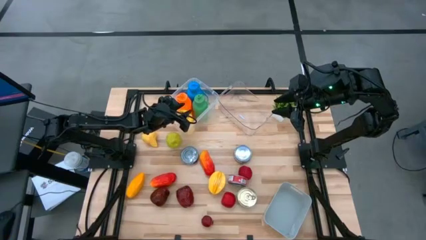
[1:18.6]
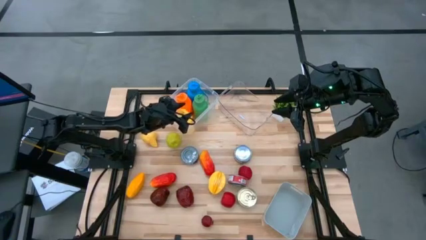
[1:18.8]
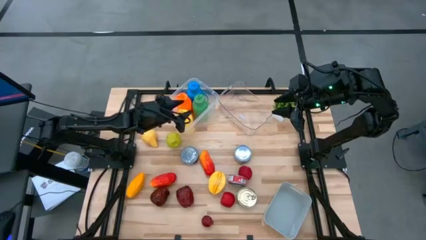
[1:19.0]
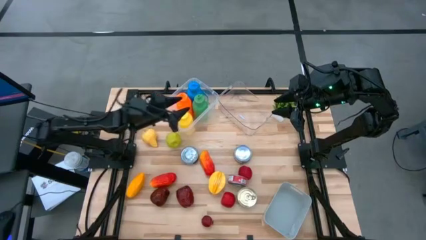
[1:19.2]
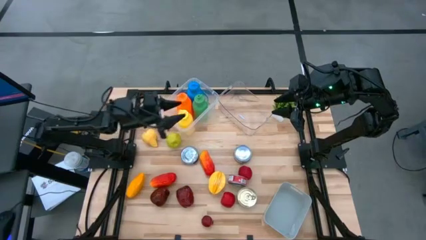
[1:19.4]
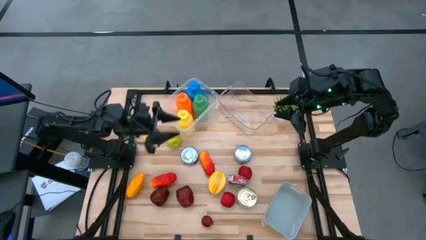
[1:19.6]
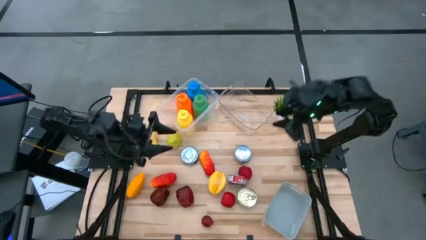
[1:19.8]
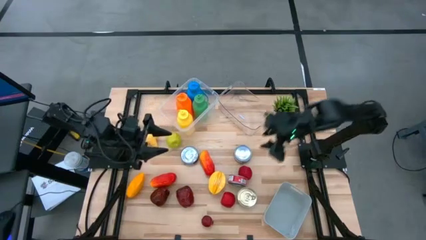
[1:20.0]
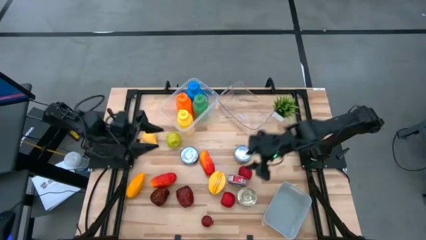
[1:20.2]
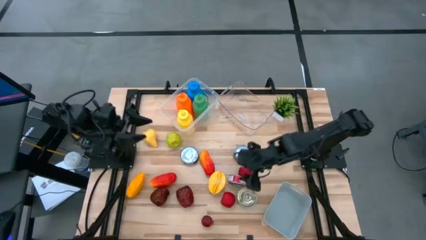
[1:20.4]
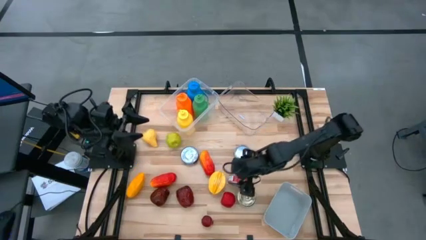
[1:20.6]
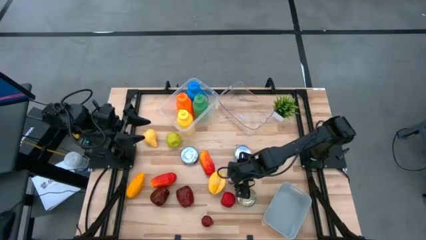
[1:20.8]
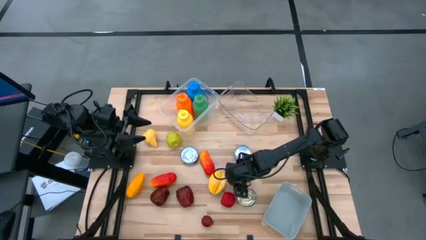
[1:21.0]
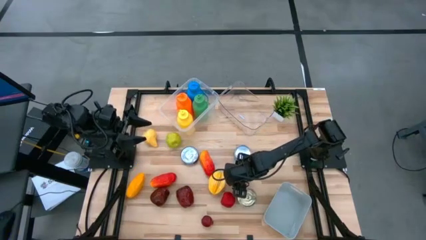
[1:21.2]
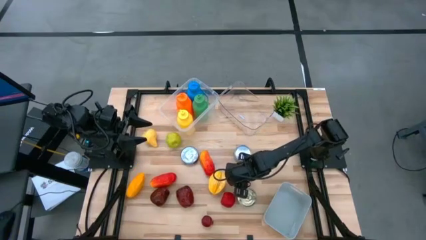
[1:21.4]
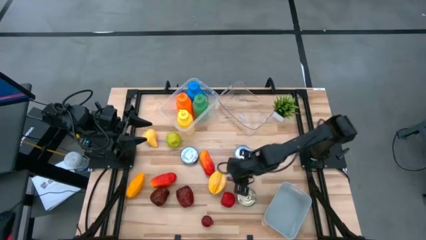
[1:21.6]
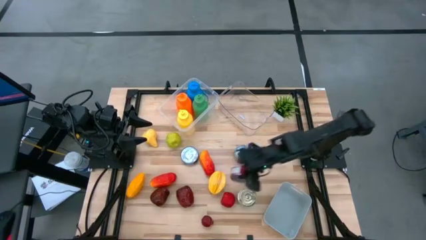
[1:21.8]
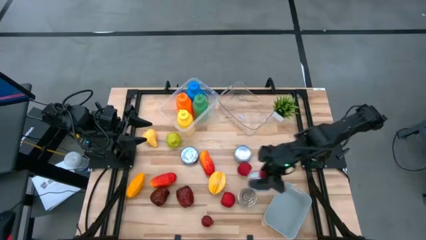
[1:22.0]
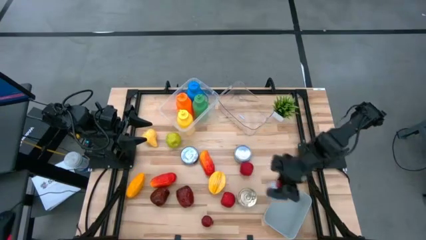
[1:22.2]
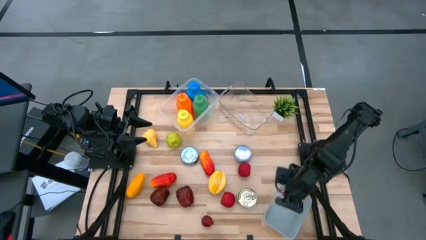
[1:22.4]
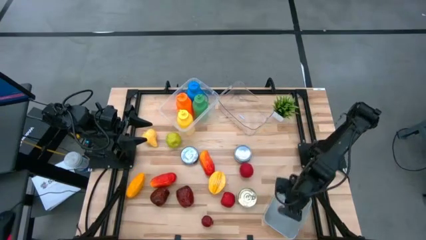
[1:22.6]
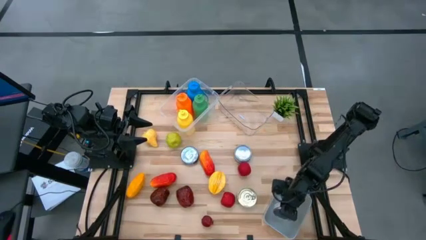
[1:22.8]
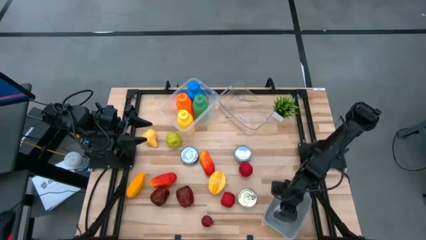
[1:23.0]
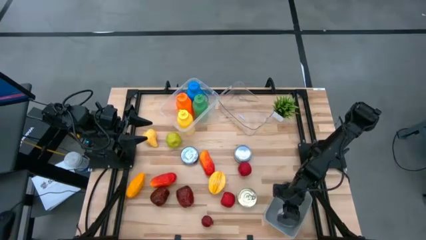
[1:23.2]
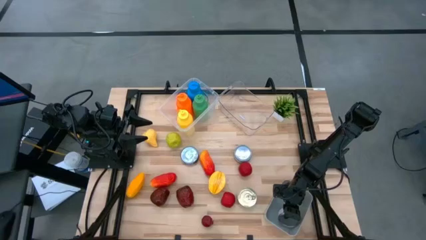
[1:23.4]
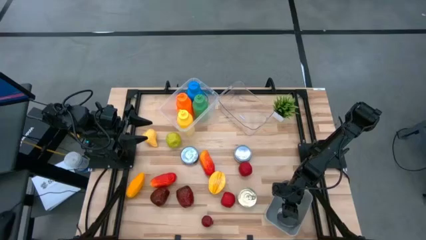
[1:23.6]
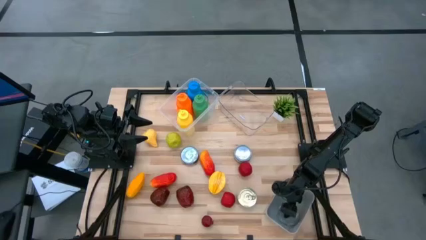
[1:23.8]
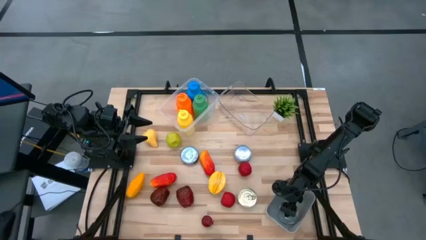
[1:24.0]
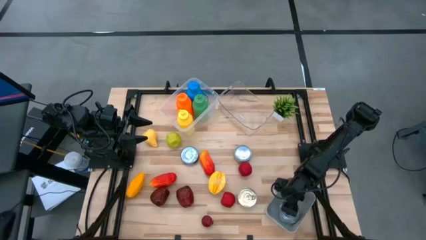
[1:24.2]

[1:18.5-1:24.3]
Task: Pick & Place Food Item
Put the red tuna can into the gray bin

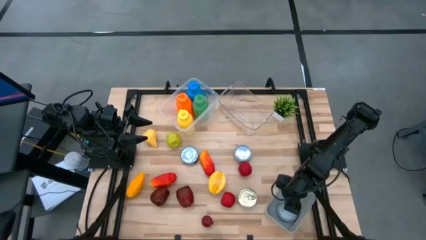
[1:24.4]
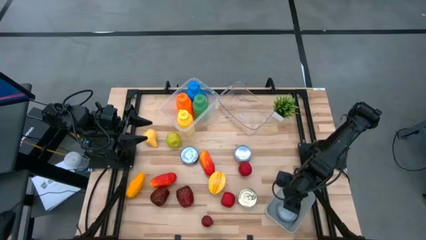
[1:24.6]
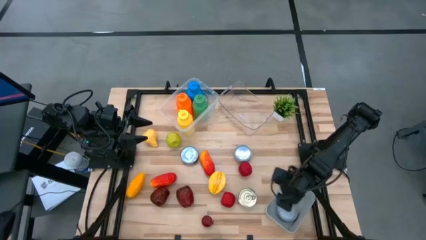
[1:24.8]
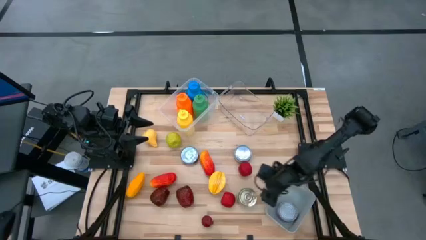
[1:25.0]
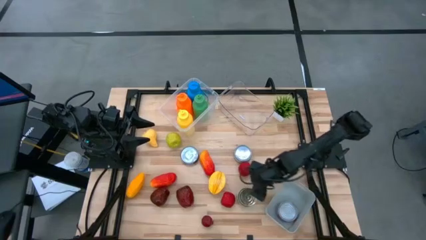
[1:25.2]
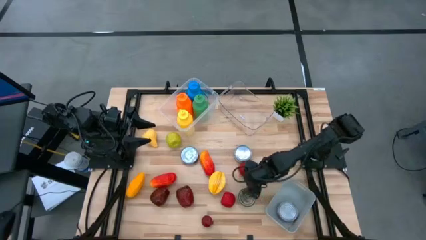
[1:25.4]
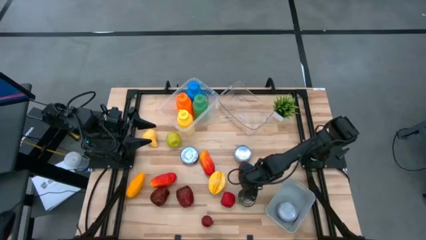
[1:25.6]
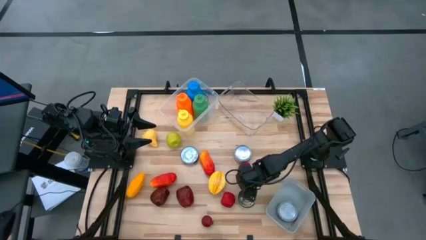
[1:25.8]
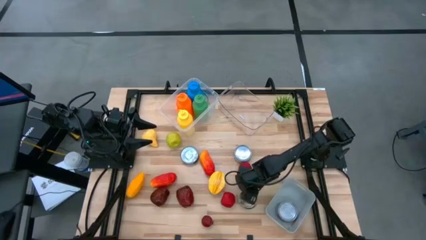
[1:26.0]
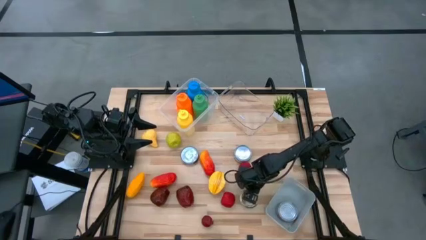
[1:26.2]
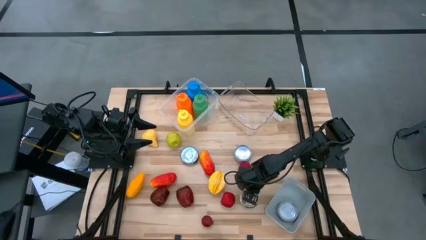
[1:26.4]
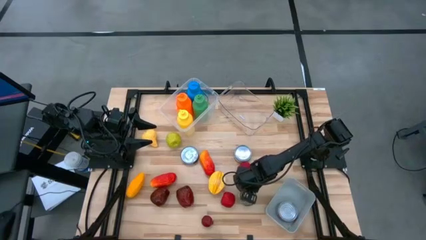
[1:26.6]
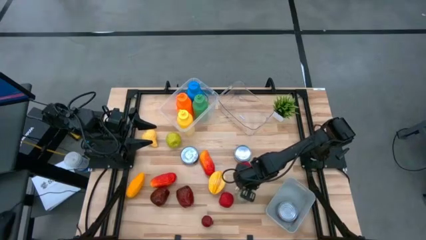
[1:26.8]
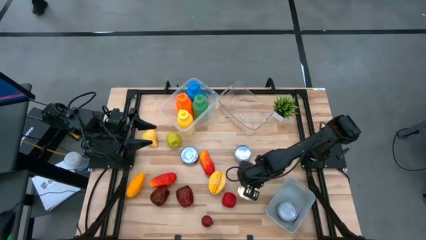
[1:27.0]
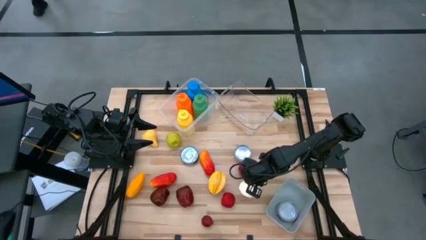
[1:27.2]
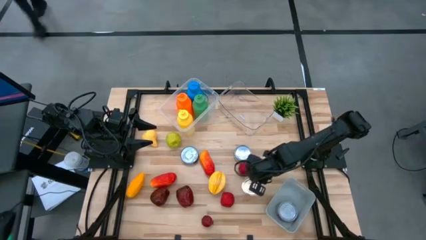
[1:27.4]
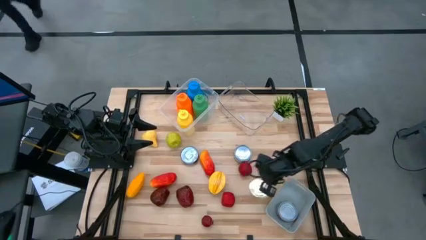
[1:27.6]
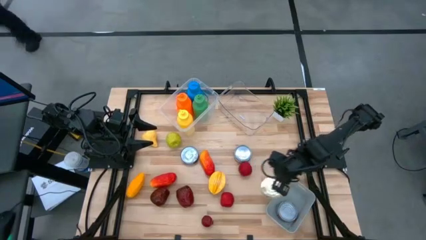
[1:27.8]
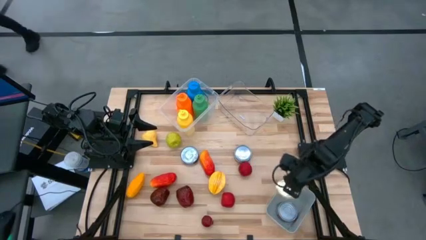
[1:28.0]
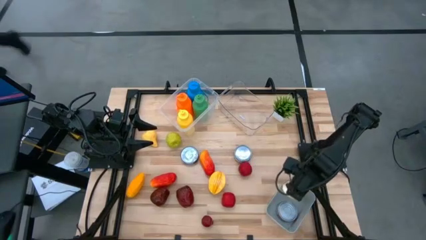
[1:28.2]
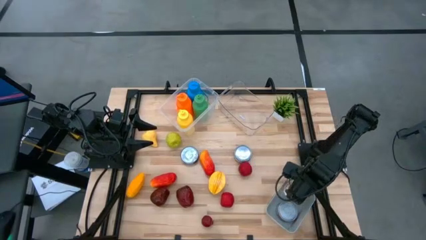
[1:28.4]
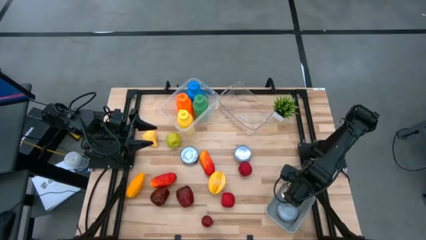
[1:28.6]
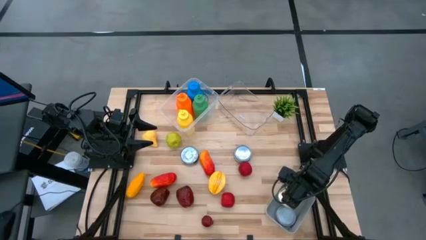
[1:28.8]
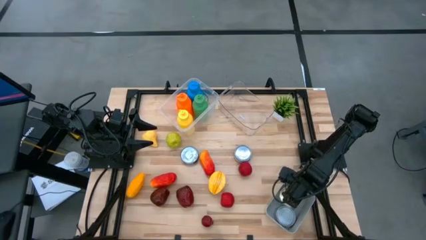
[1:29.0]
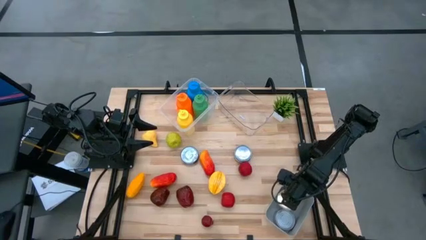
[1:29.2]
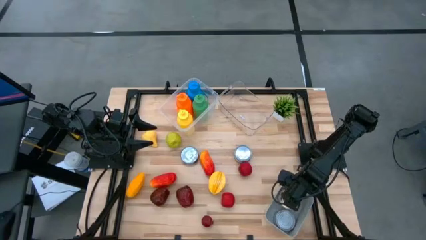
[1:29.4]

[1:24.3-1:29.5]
Put the blue tuna can into the gray bin

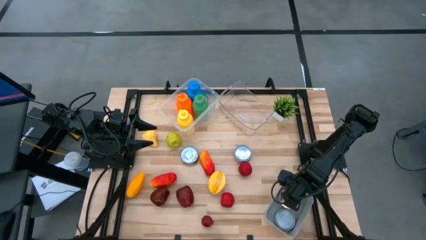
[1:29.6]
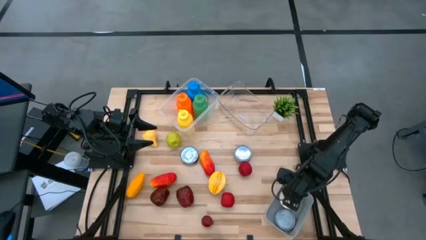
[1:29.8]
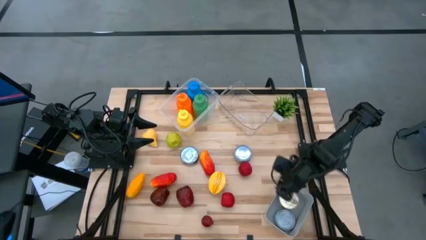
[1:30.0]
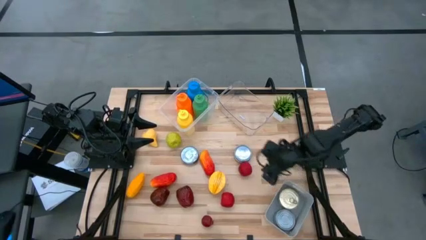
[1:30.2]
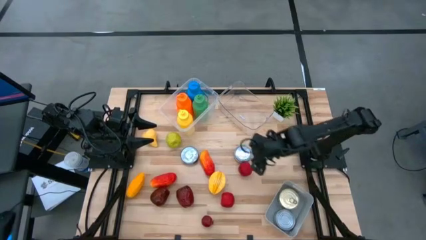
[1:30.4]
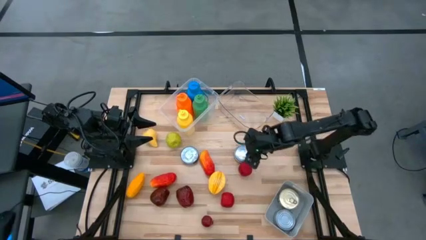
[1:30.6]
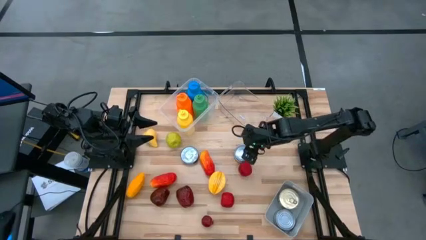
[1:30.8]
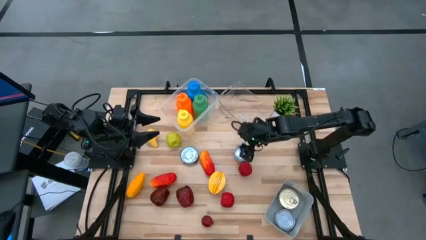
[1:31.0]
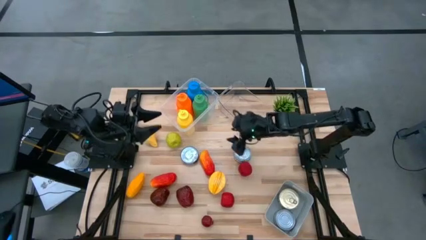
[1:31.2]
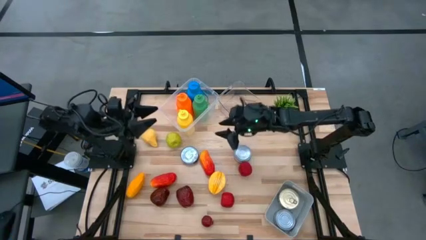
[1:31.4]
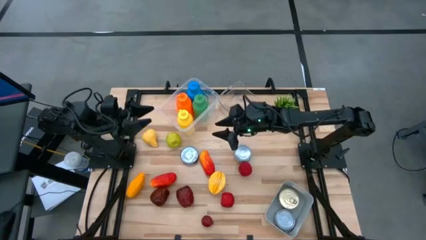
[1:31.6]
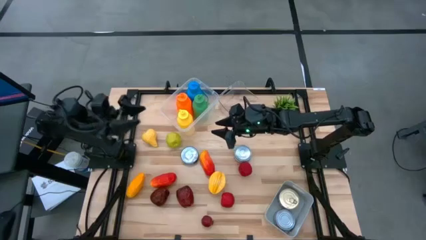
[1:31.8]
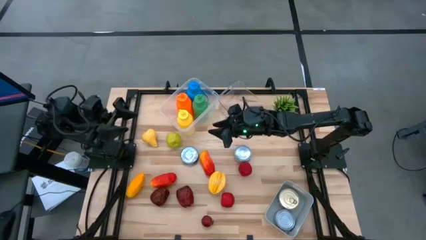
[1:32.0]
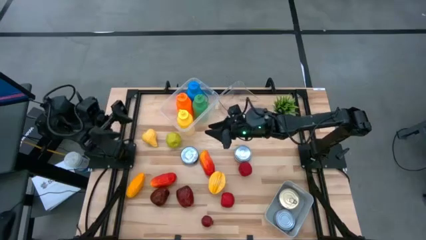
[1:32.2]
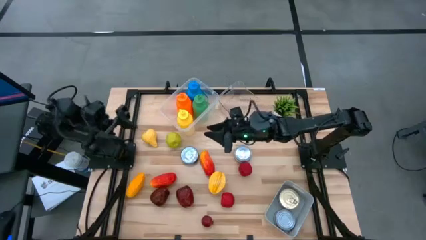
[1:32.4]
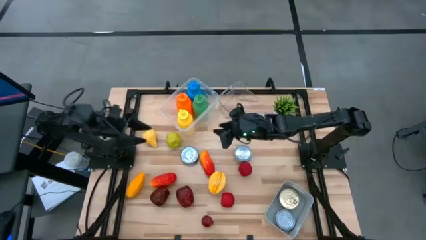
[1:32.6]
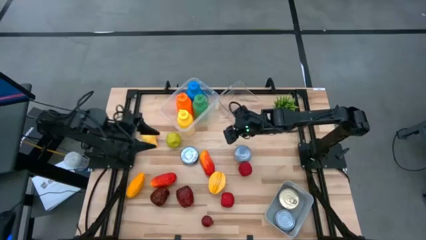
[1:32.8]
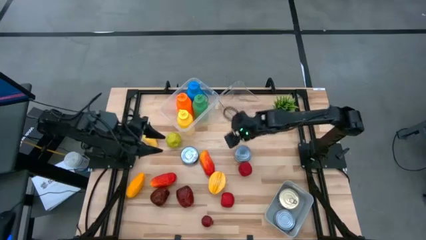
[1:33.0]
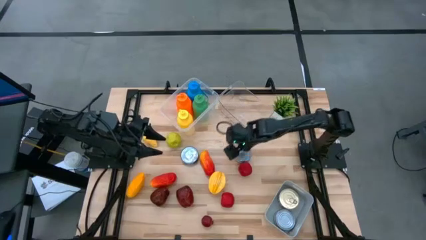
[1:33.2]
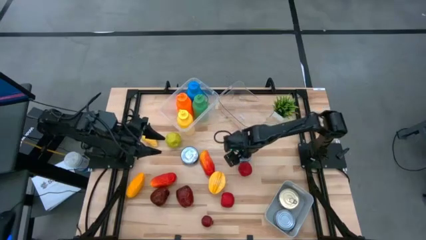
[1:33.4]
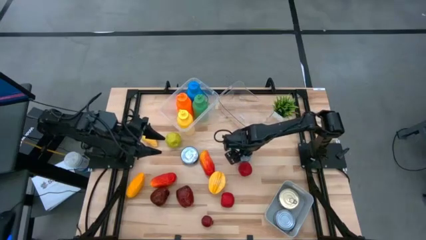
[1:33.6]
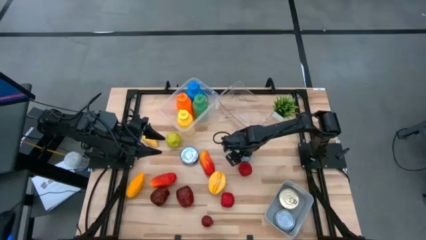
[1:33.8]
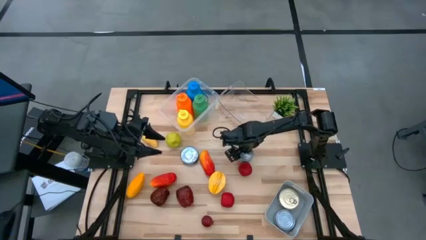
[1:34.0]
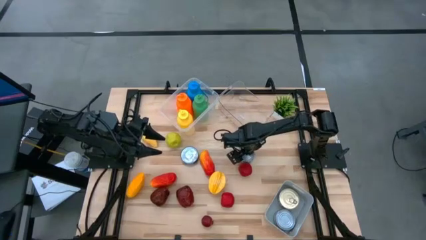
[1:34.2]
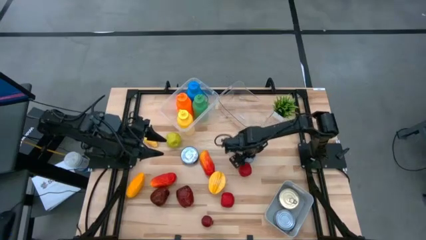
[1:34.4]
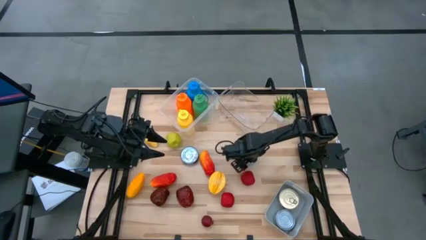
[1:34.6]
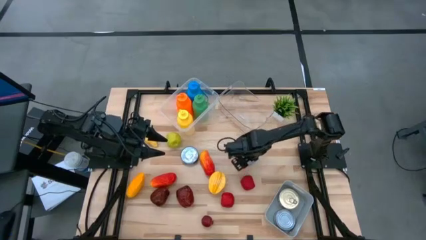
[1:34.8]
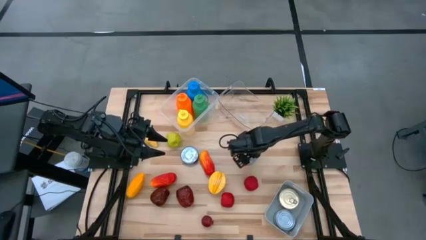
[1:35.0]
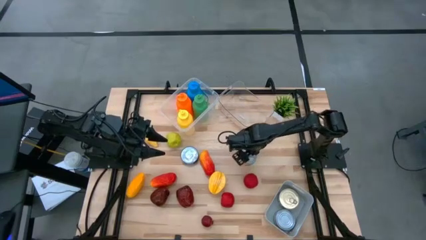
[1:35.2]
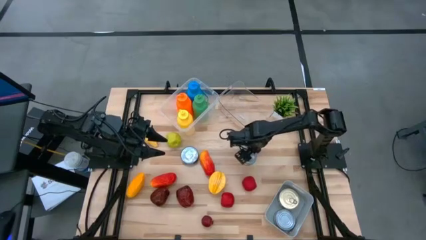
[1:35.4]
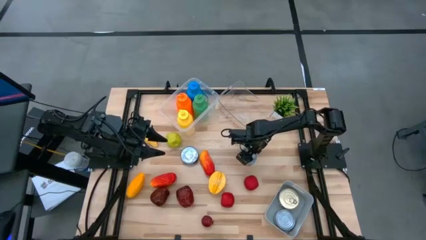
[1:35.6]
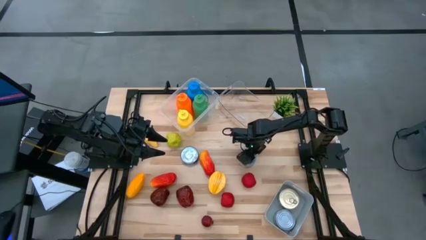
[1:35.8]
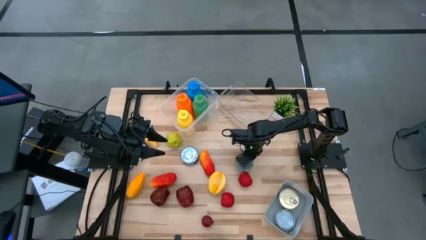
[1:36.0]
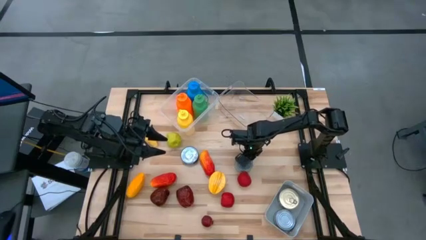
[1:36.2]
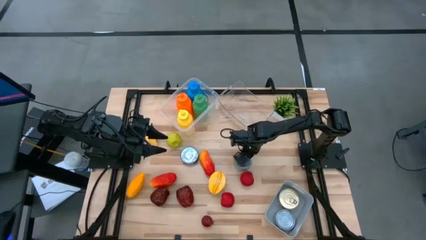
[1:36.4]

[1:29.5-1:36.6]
Put the green tuna can into the gray bin
